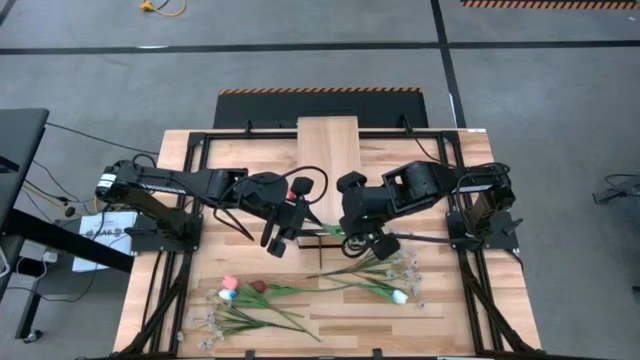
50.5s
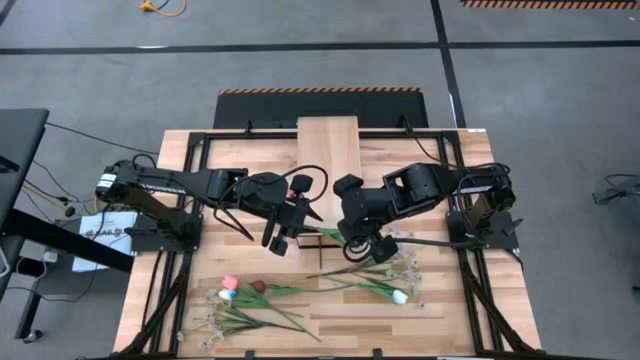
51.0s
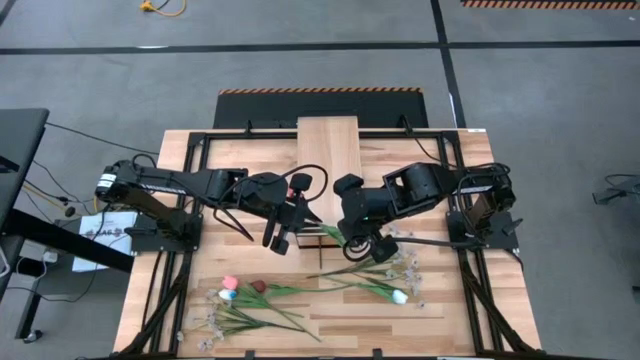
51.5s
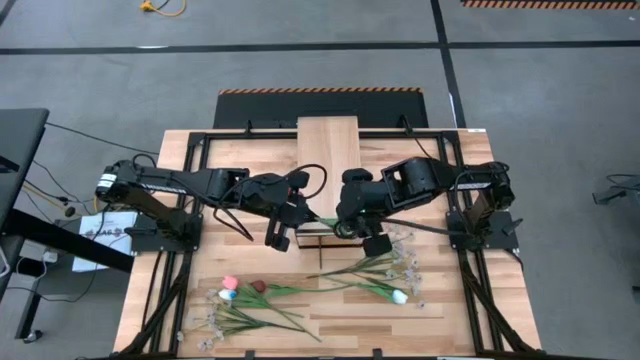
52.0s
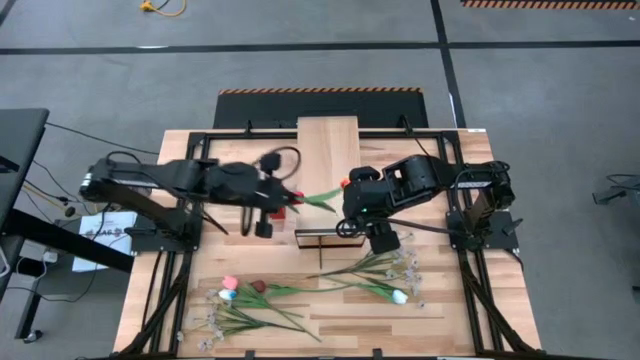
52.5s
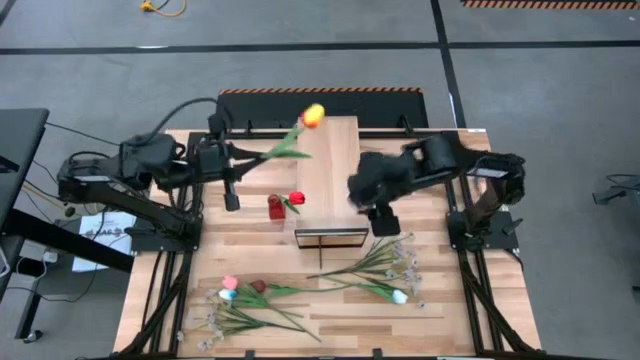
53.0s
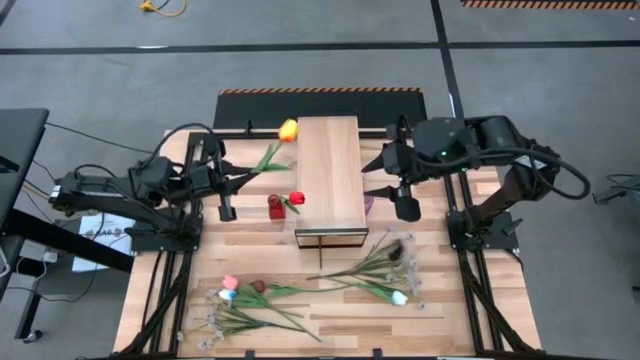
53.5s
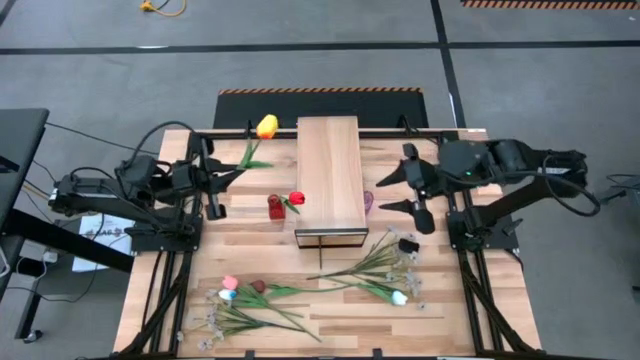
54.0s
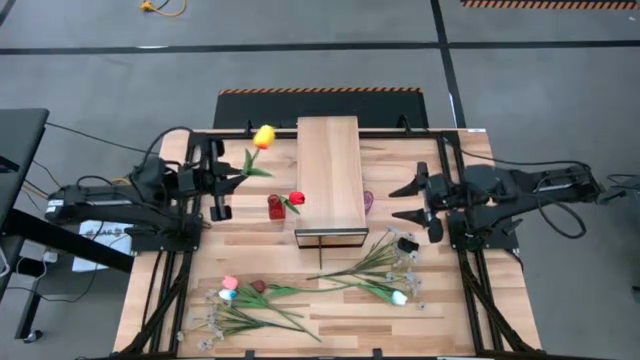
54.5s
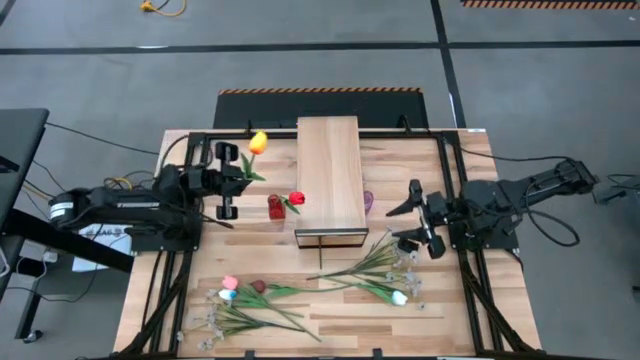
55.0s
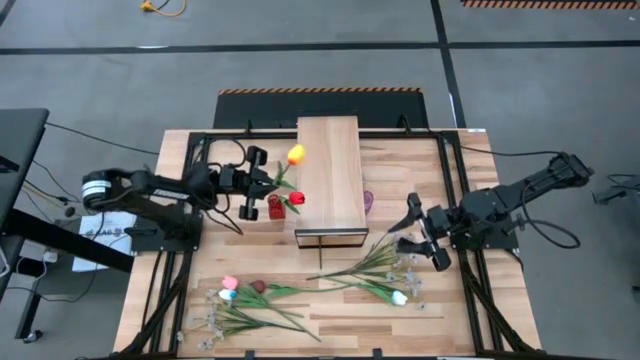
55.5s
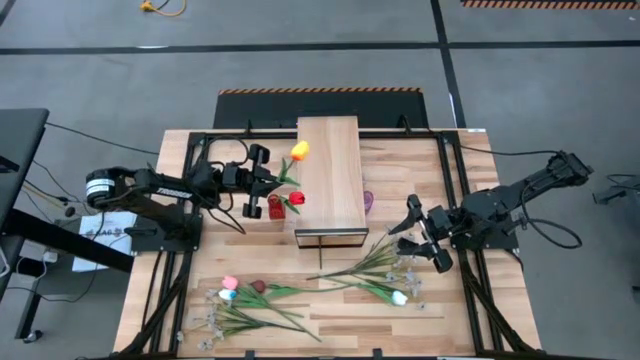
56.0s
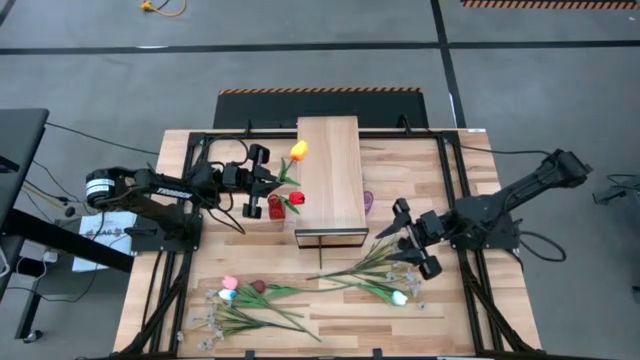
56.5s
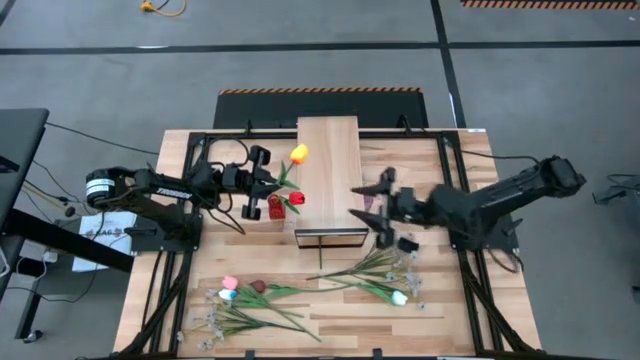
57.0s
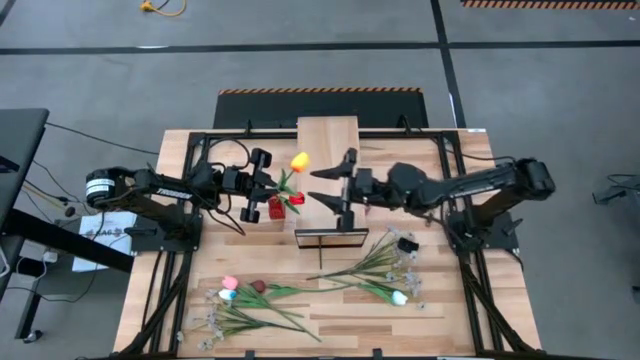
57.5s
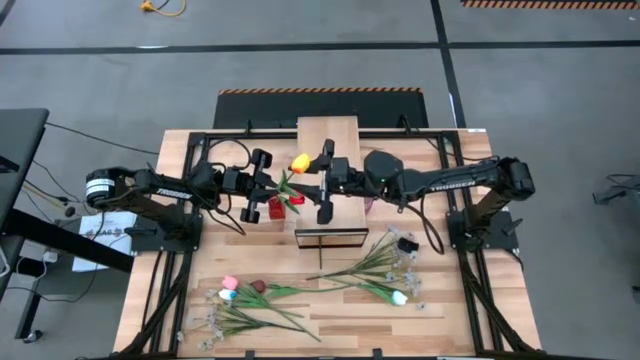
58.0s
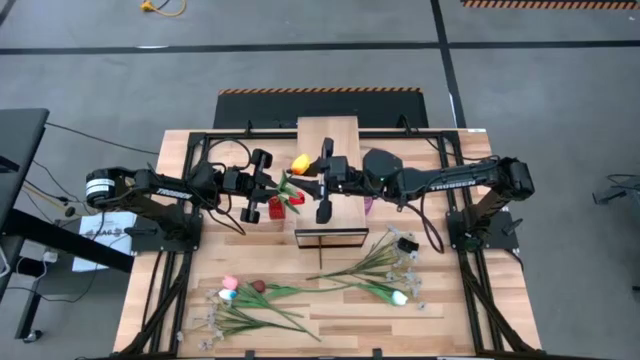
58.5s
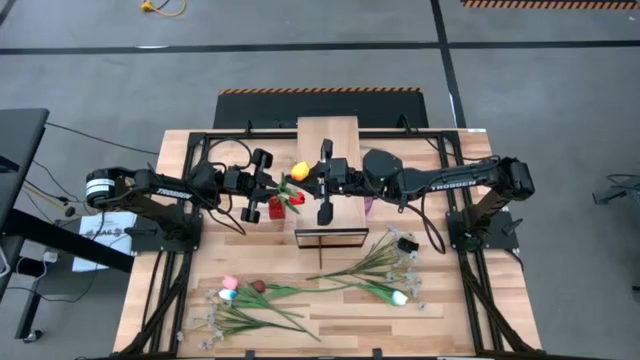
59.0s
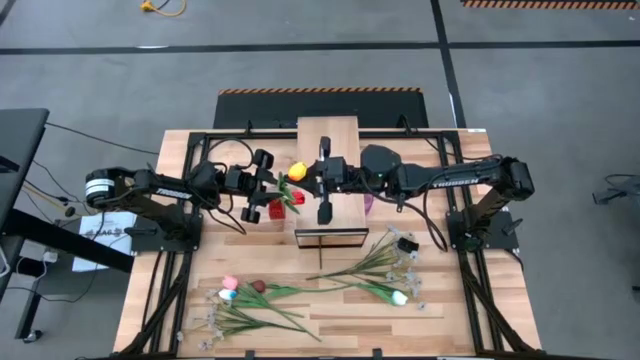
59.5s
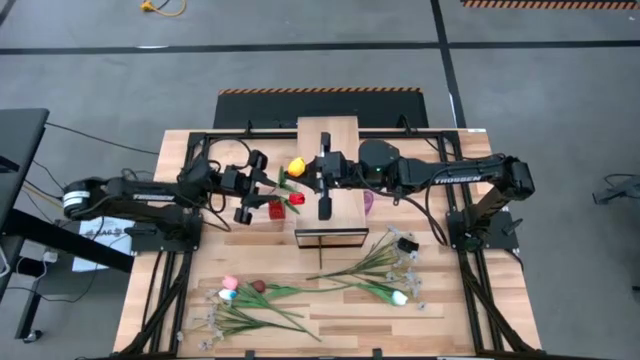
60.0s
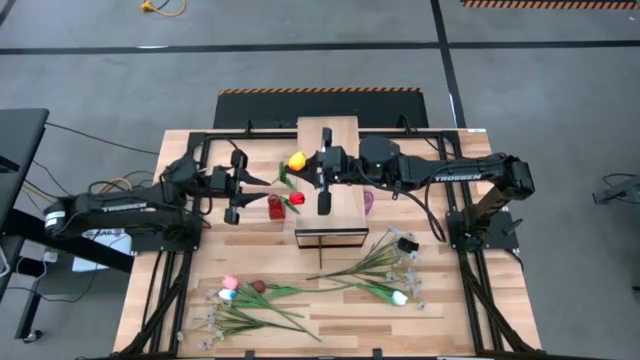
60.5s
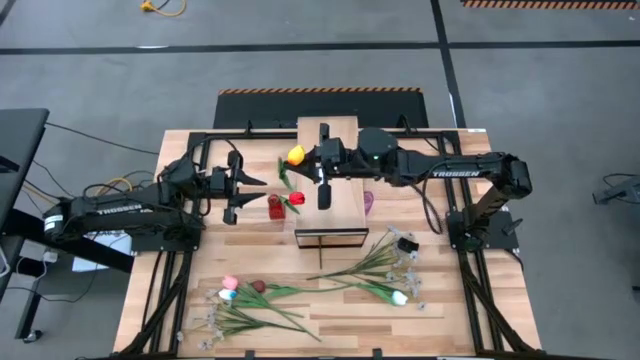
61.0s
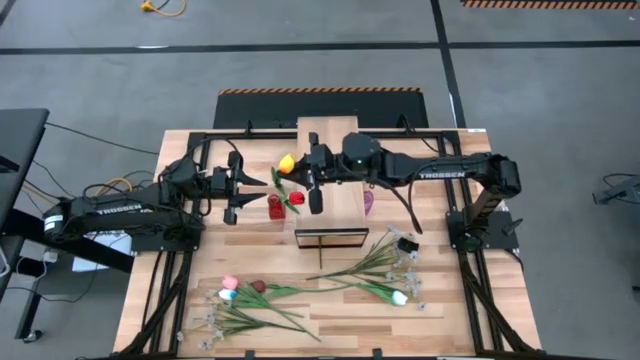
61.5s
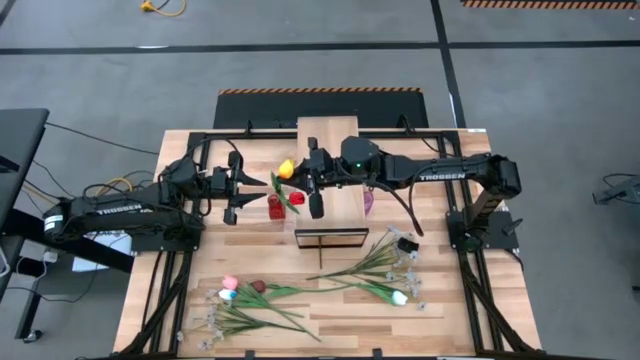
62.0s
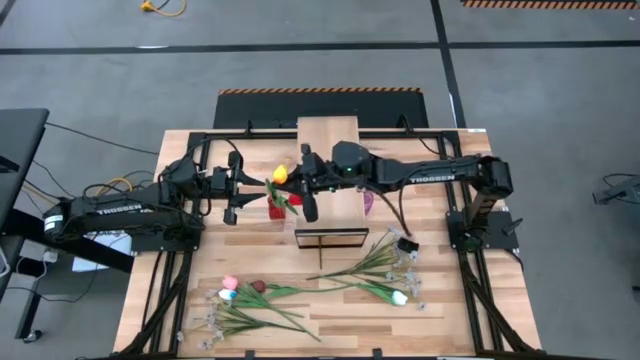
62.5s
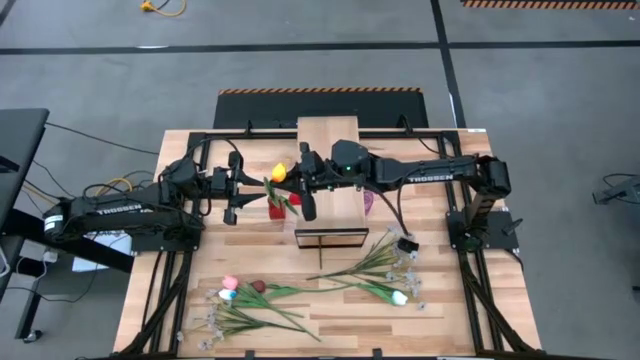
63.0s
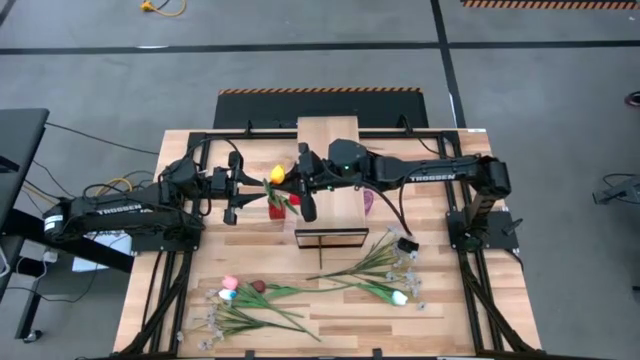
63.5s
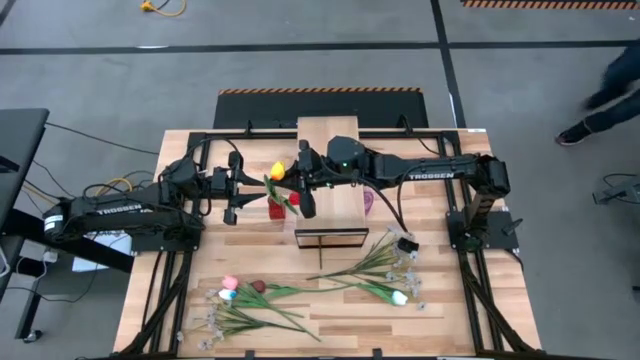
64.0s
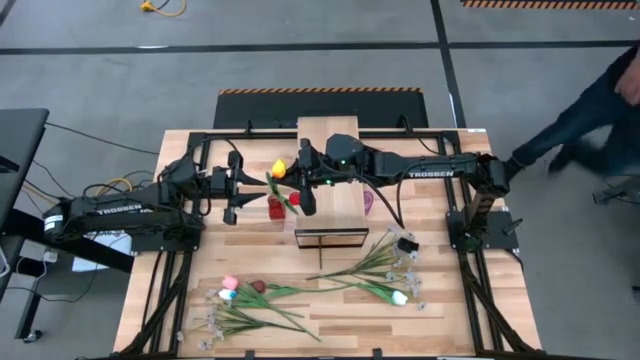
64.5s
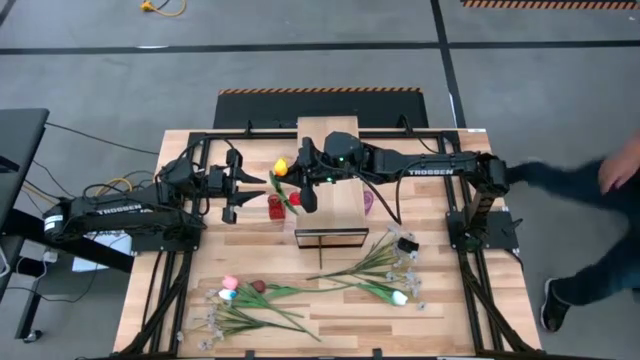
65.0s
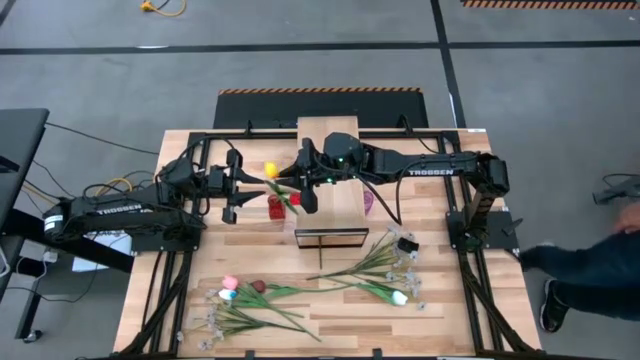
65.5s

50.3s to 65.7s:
Task: Pick and place flowers into a vace then onto a shelf
Put the yellow tulip into the red flower vase

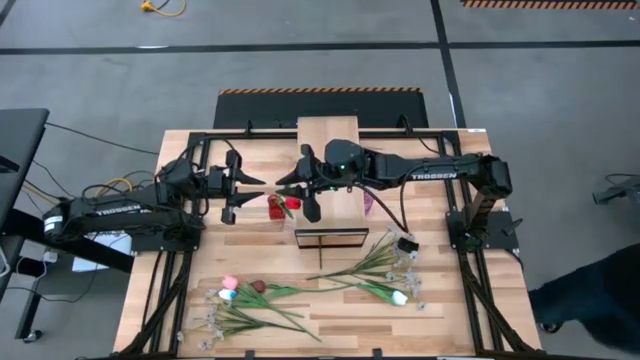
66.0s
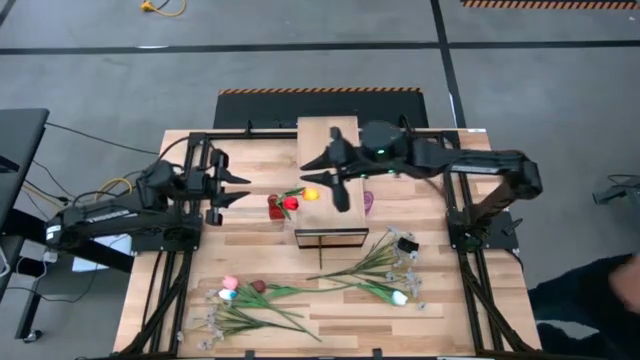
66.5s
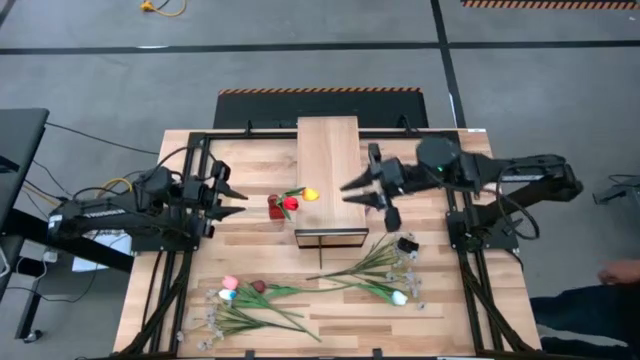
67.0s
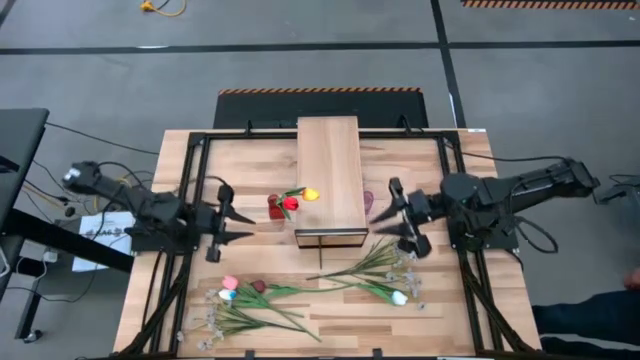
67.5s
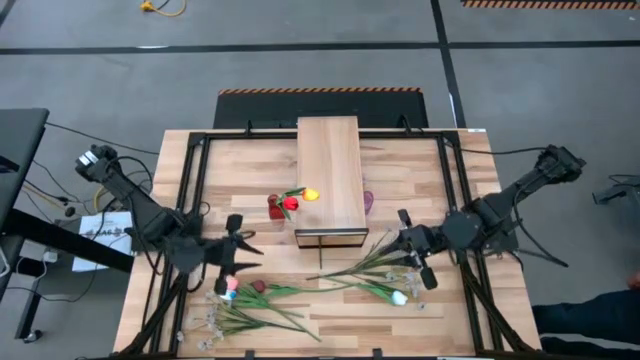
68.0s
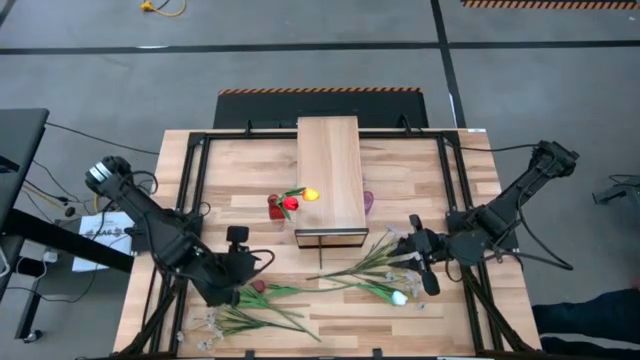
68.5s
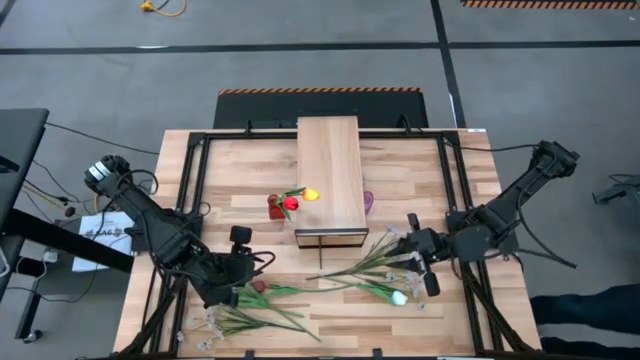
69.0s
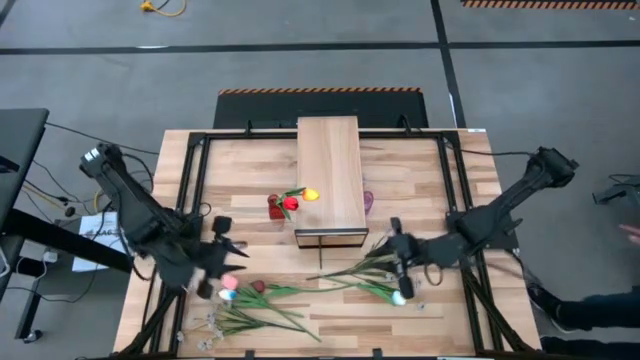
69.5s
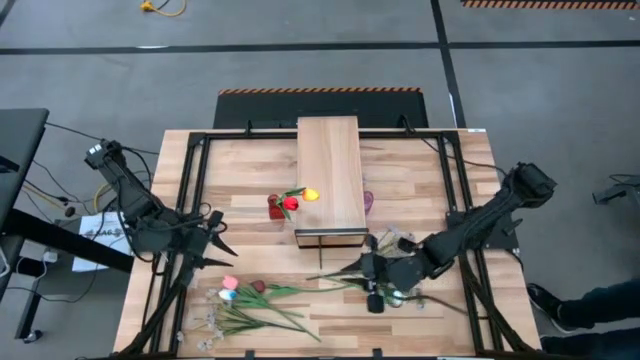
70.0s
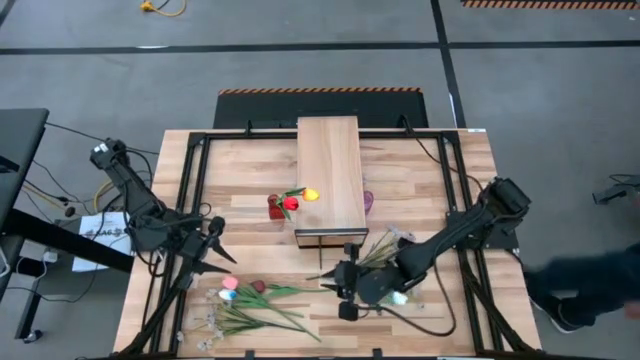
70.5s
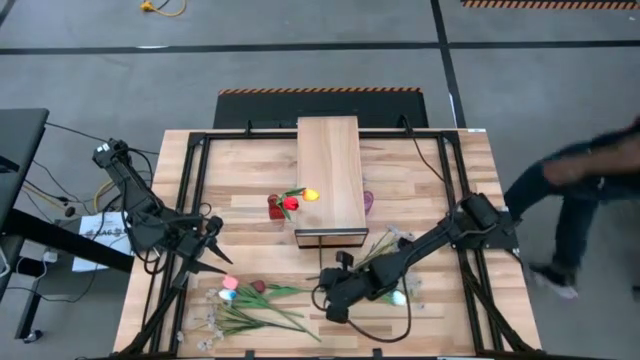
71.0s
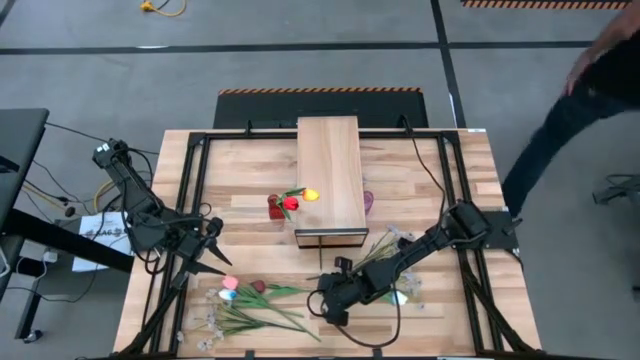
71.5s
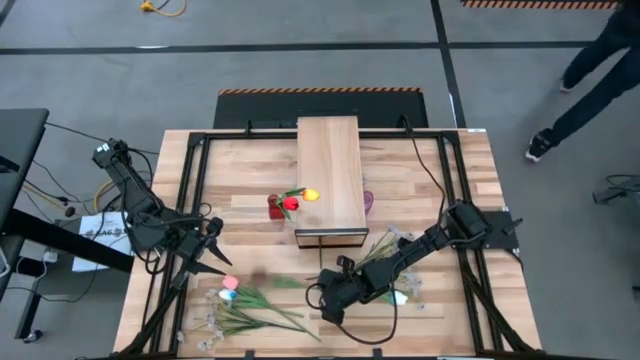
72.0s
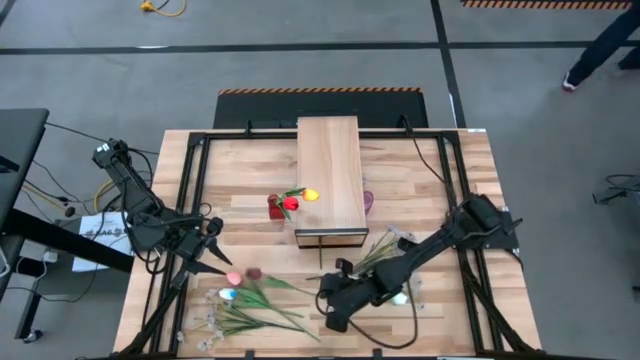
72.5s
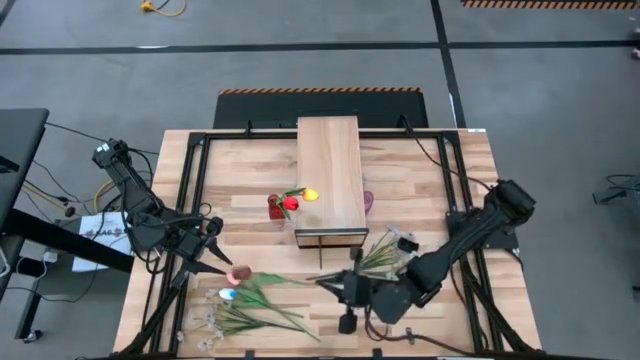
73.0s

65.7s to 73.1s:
Put the maroon tulip into the red crystal vase
